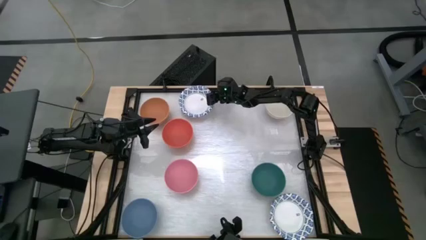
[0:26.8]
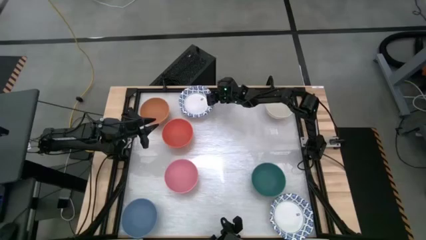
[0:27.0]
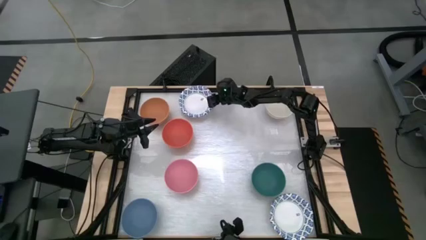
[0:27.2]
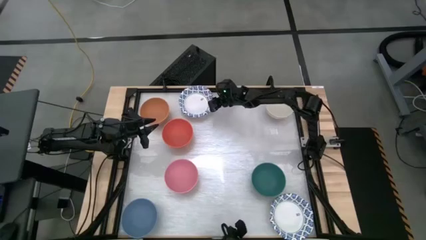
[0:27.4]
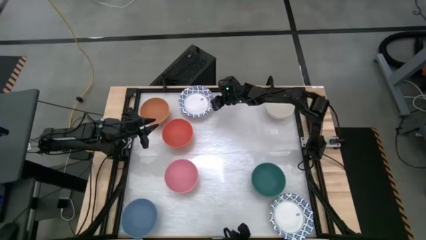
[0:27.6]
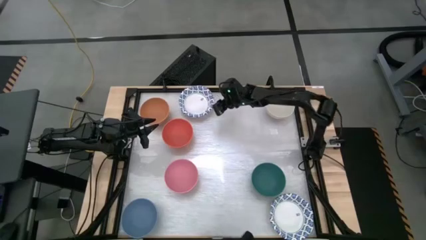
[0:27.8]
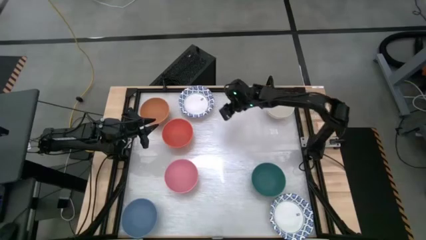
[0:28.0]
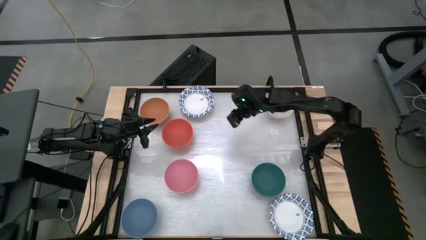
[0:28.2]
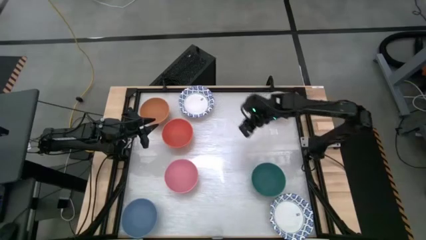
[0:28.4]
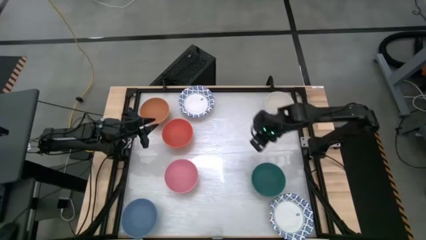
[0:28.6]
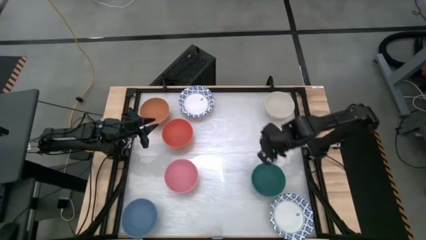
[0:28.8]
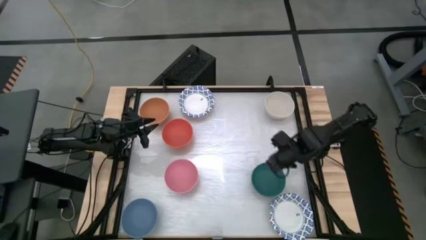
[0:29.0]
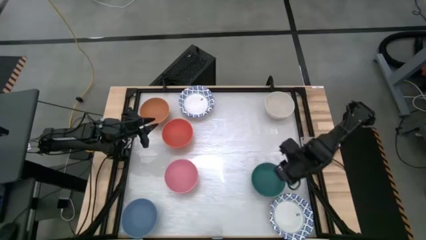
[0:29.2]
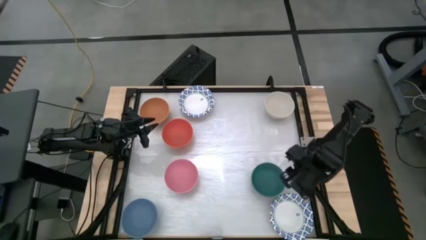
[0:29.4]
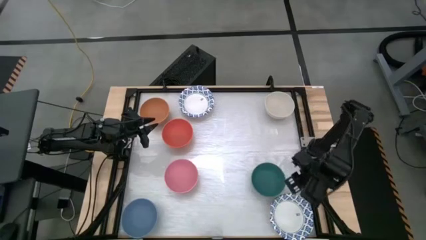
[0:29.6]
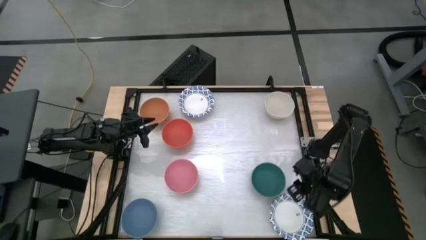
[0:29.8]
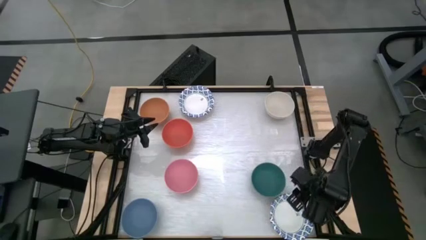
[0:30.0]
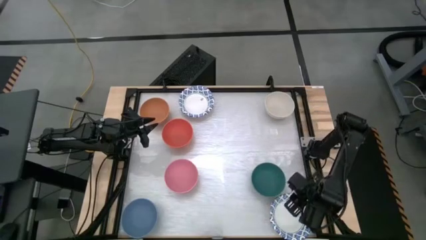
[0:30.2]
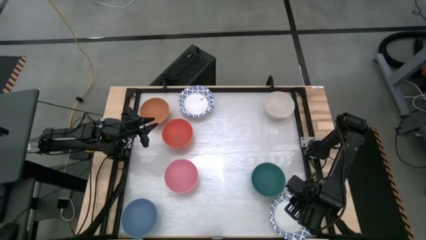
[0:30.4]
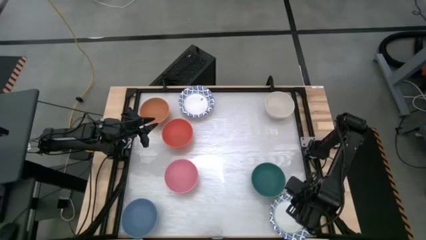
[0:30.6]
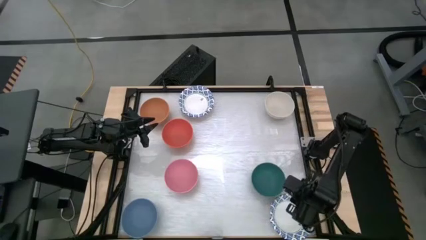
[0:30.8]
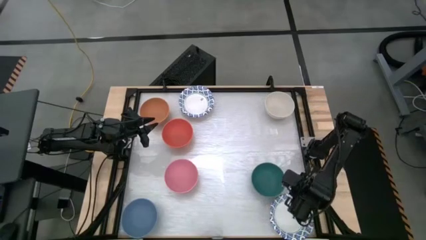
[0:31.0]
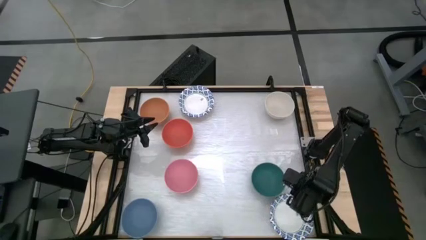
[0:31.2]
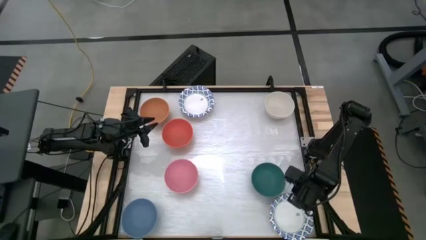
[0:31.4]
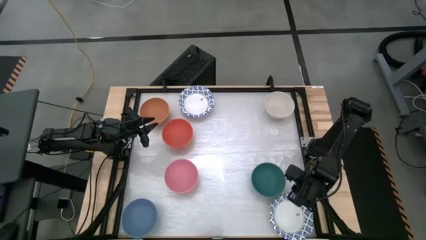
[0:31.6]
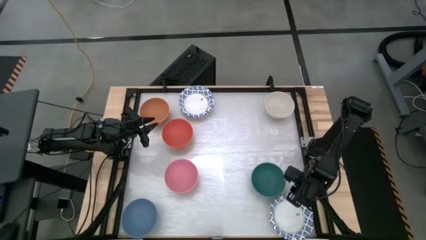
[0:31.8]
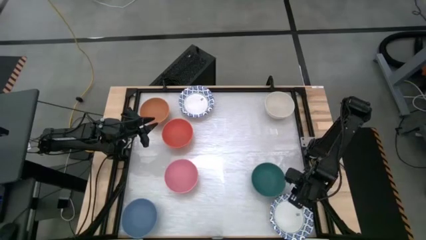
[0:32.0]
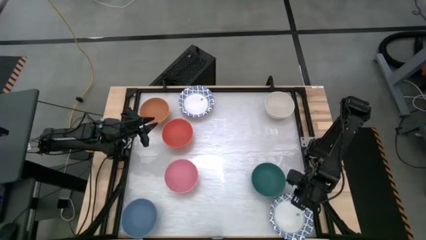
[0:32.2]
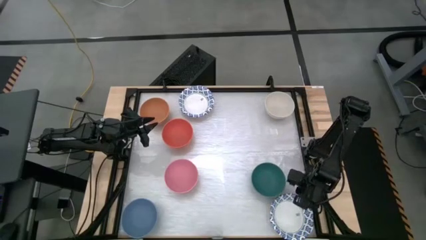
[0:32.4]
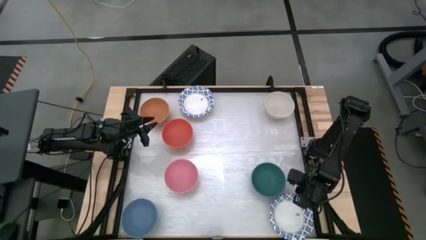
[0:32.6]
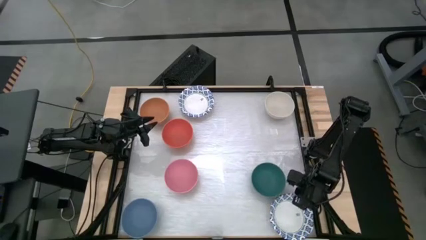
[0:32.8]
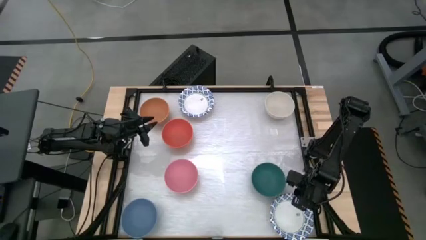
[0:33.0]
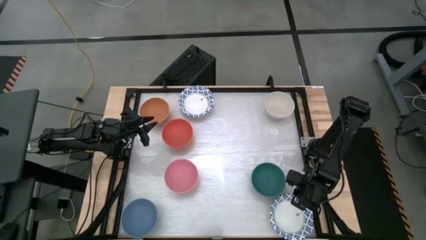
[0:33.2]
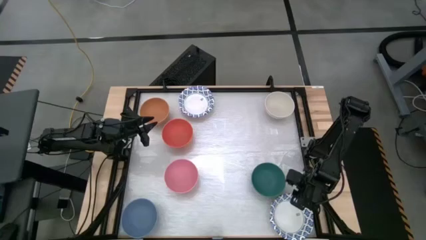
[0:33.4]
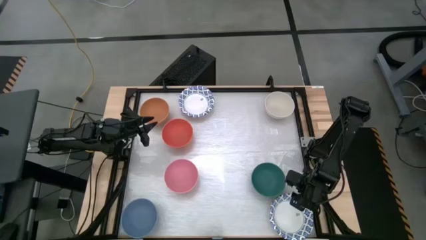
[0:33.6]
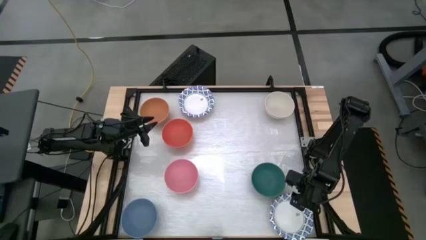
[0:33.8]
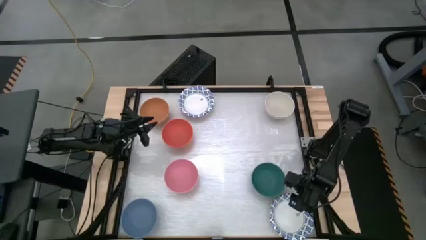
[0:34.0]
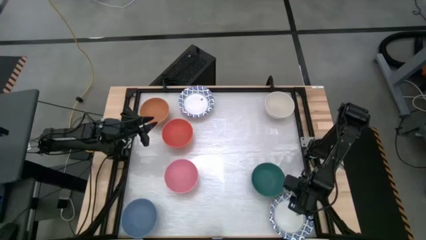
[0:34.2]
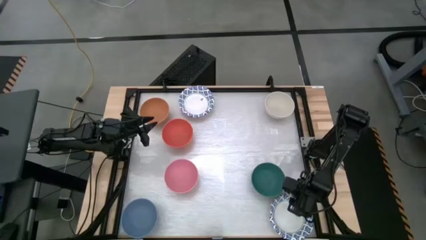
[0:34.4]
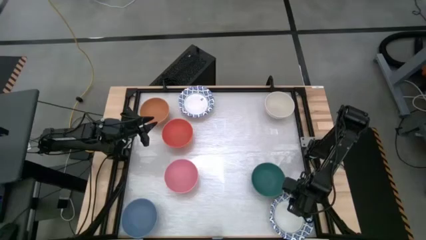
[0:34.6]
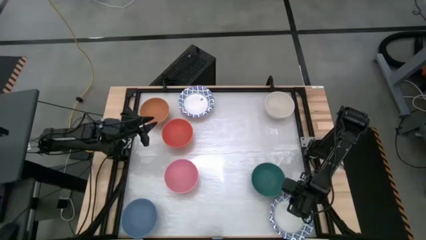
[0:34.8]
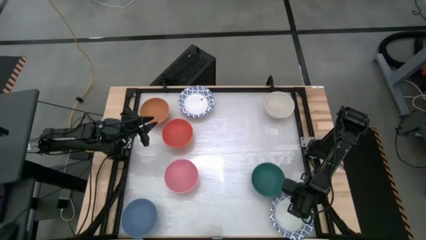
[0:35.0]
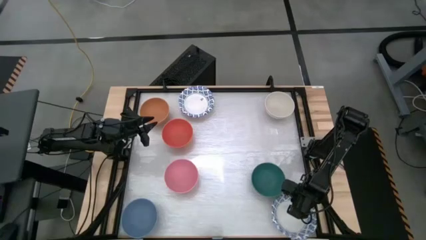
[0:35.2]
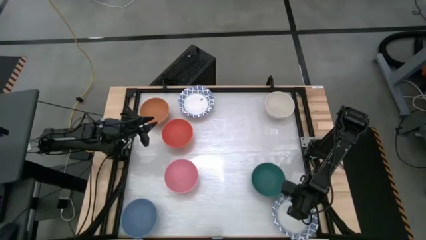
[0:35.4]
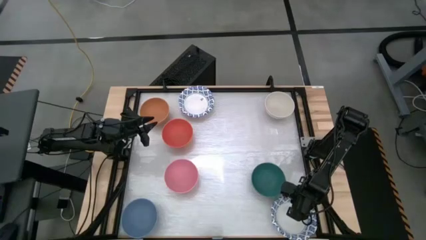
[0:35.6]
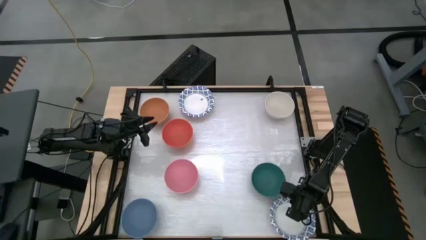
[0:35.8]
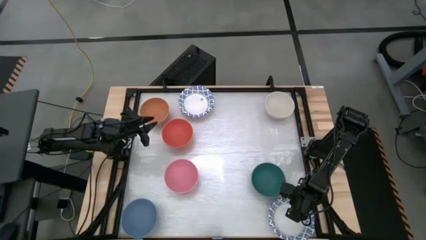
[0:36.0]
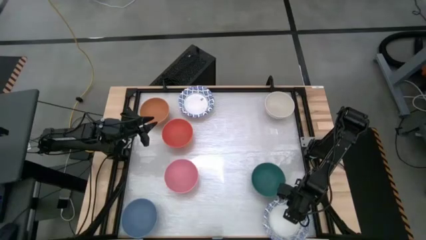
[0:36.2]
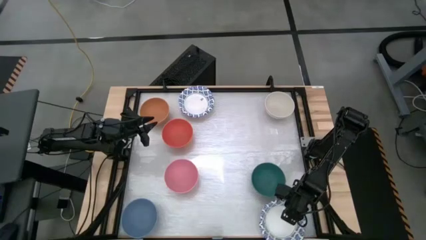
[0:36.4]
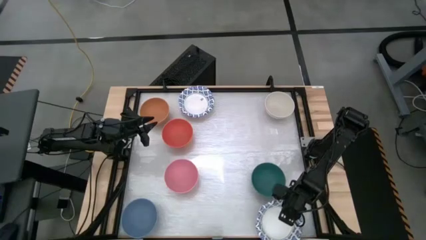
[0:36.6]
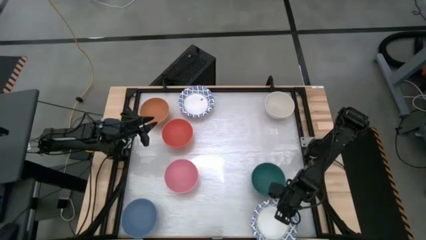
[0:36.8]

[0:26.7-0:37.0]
Stack the white pattern bowl onto the stack of bowls
